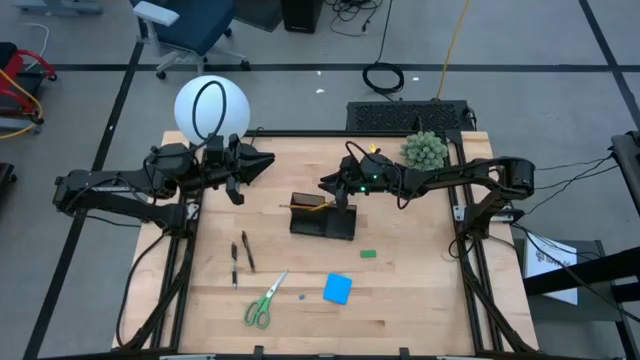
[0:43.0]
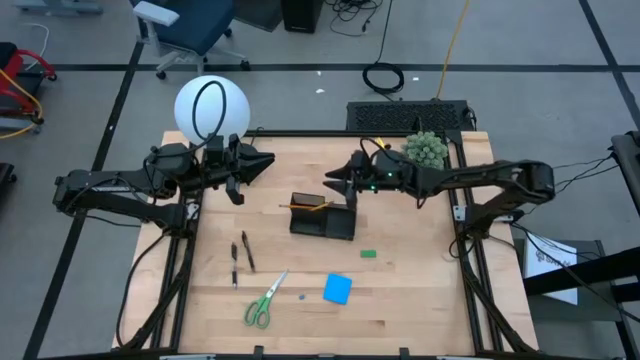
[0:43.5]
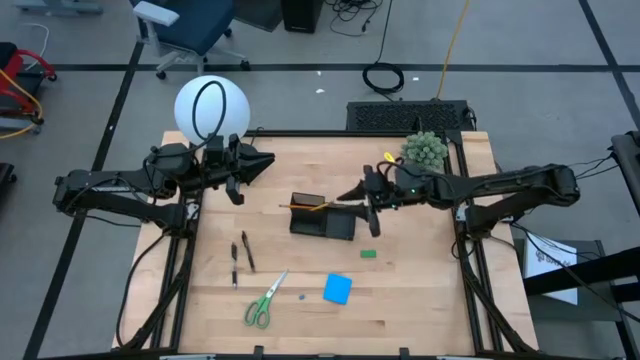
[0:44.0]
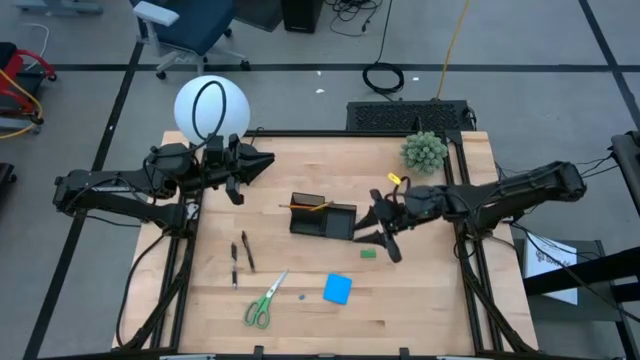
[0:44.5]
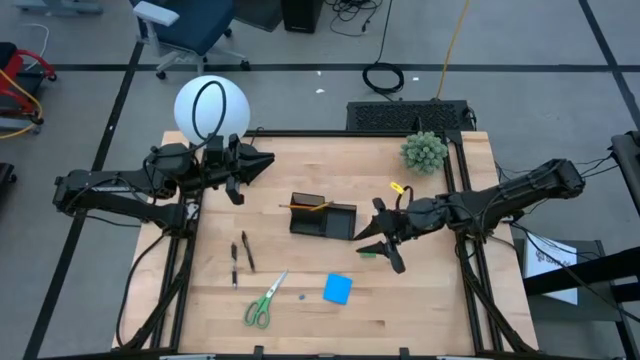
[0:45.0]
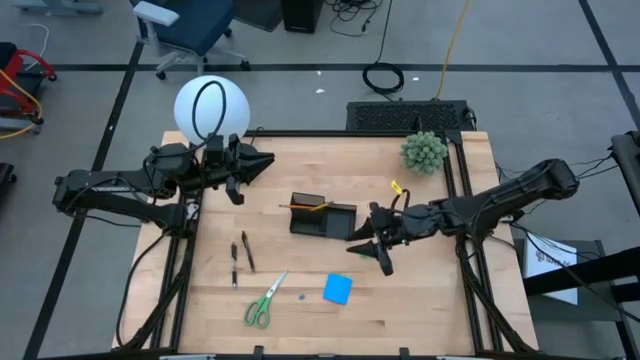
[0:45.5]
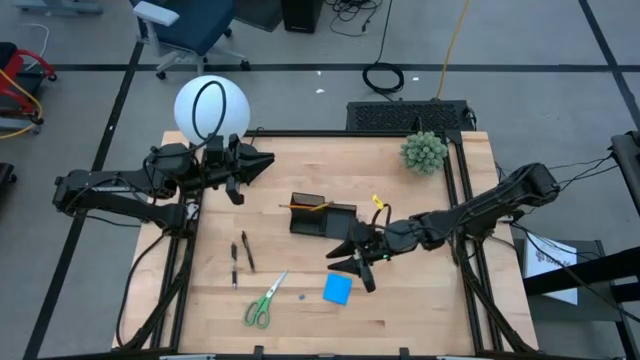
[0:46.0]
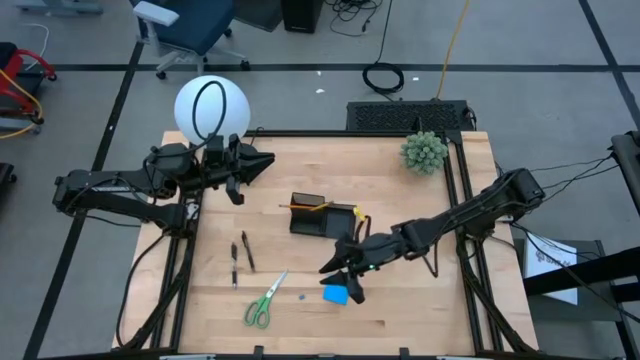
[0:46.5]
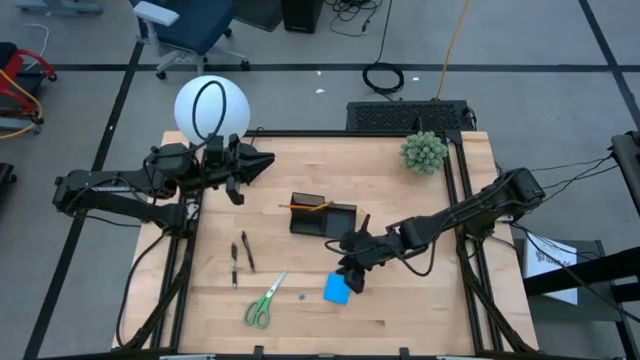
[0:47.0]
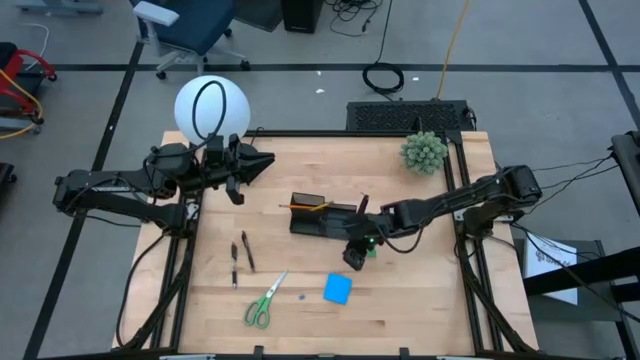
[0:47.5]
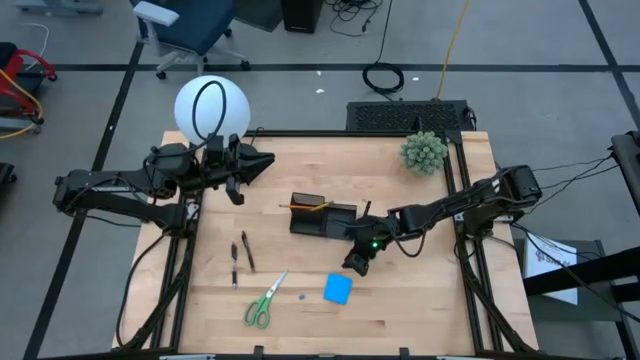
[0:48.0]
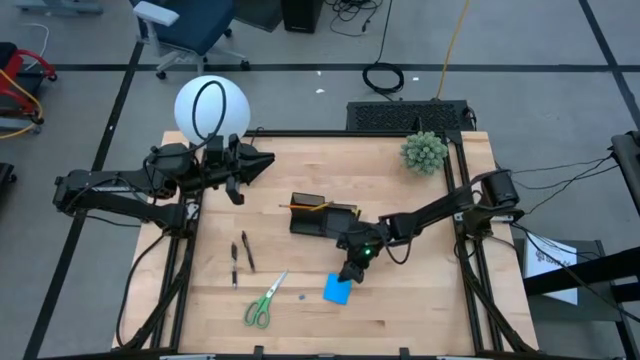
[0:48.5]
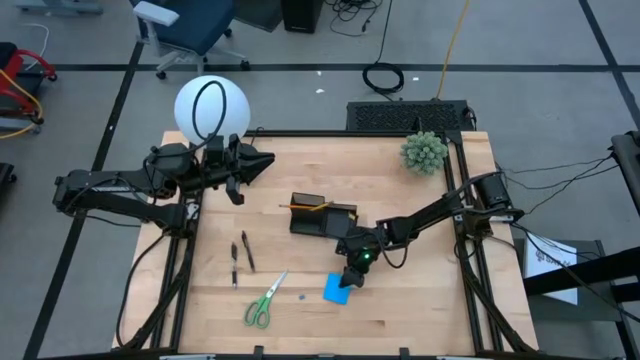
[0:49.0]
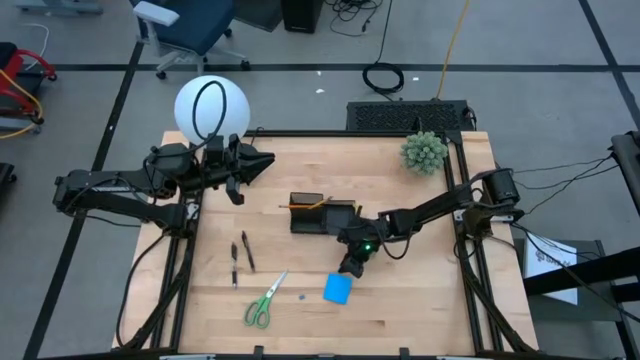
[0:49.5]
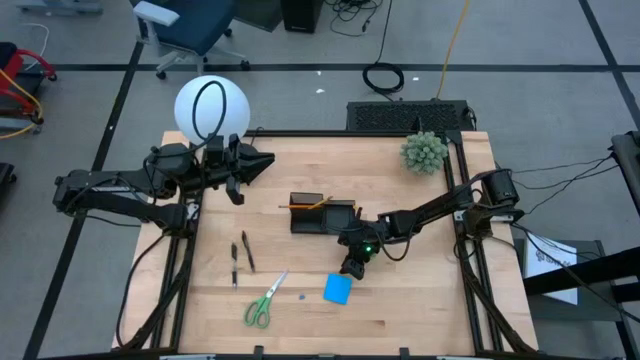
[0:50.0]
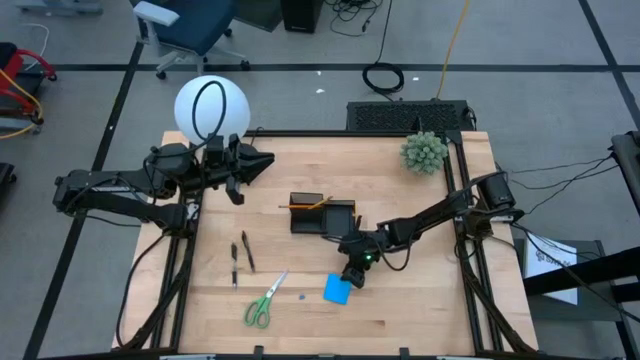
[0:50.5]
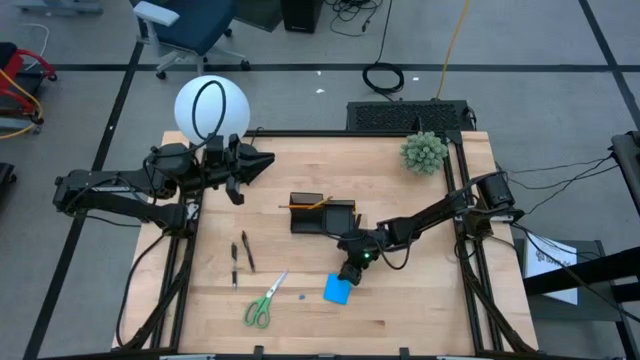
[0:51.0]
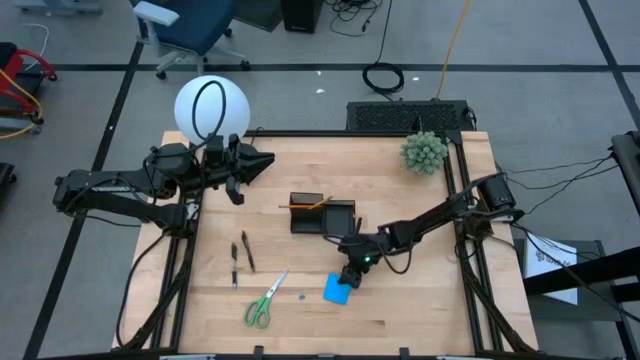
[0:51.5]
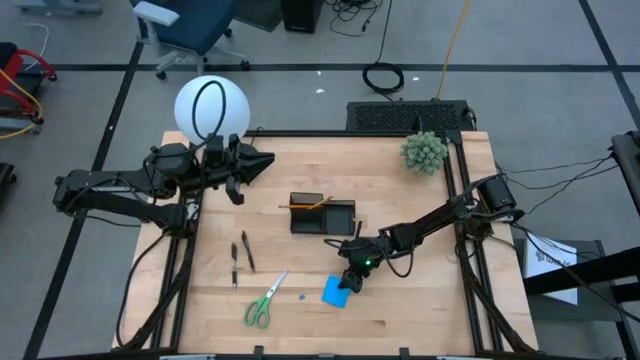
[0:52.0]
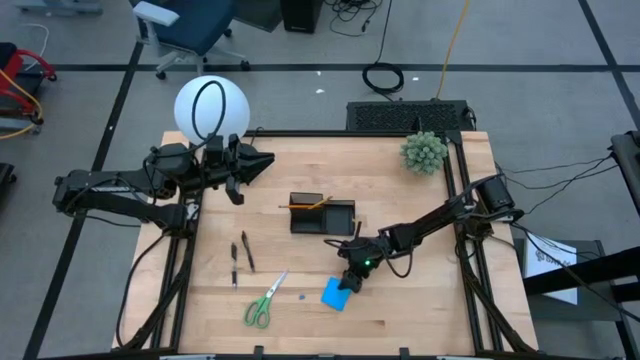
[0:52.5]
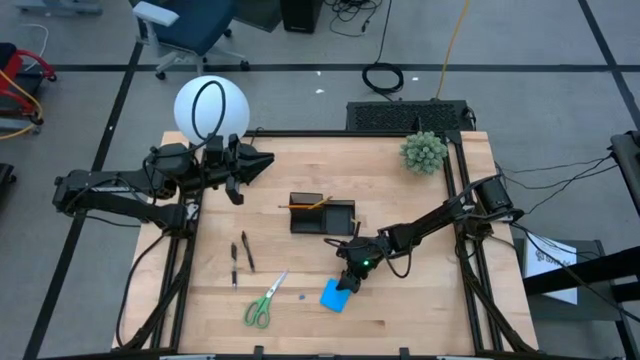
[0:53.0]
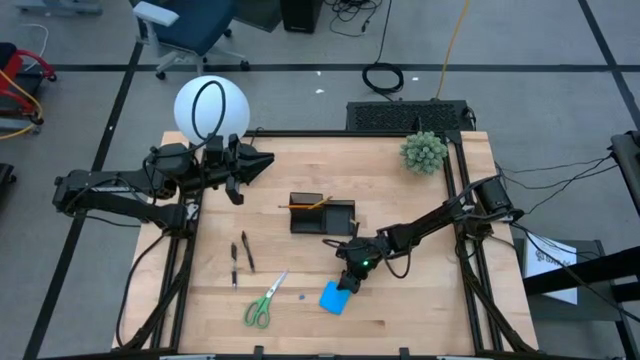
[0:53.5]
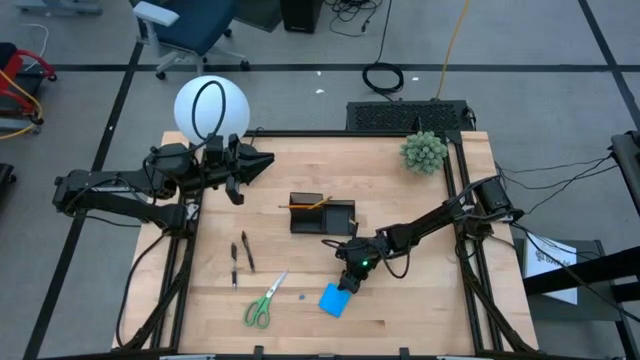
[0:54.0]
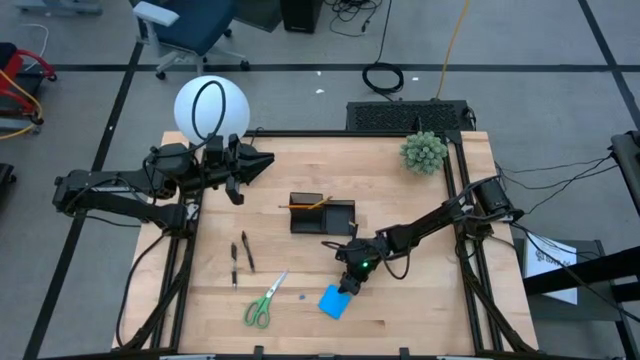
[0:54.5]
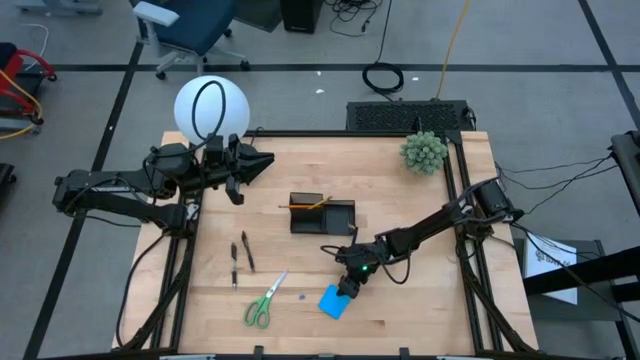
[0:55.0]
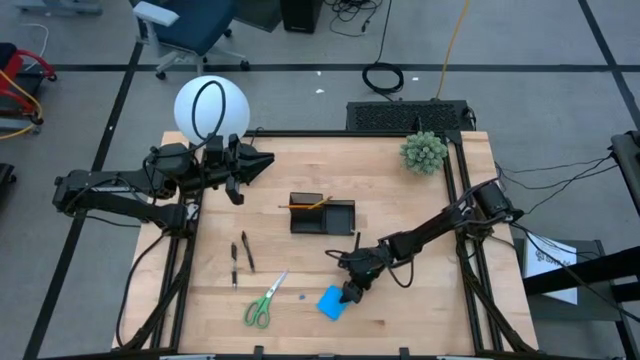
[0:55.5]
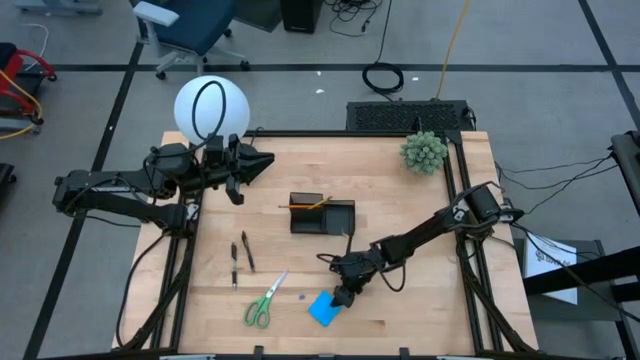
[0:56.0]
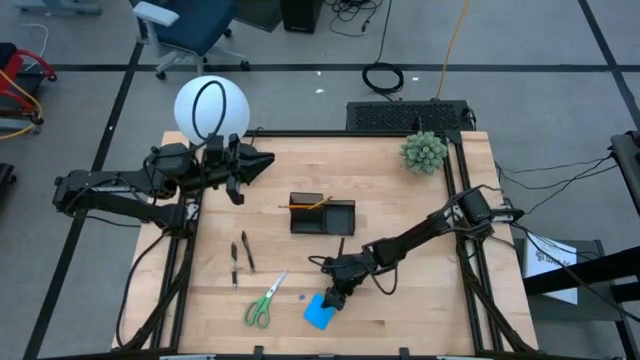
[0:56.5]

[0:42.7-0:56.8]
Task: Pick and place office supplies into organizer
Put the blue sticky notes into the of the desk organizer

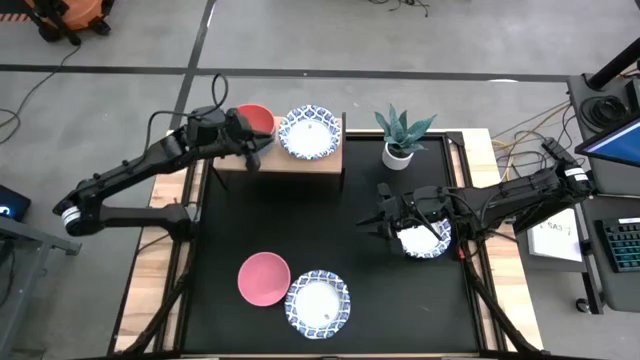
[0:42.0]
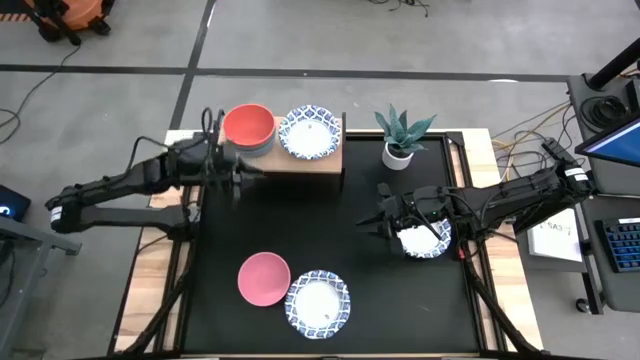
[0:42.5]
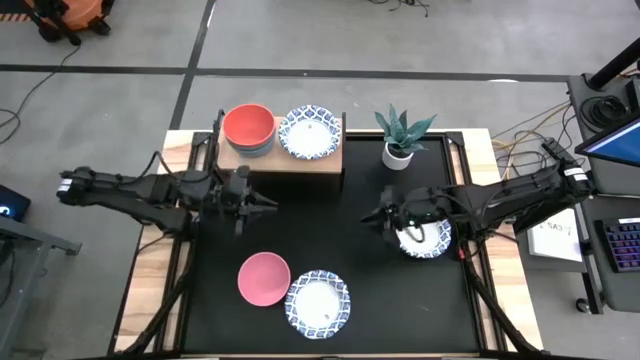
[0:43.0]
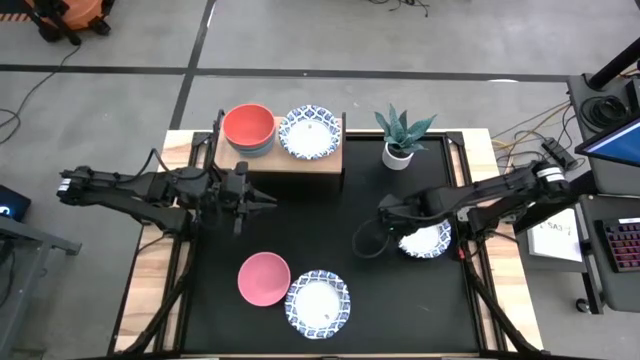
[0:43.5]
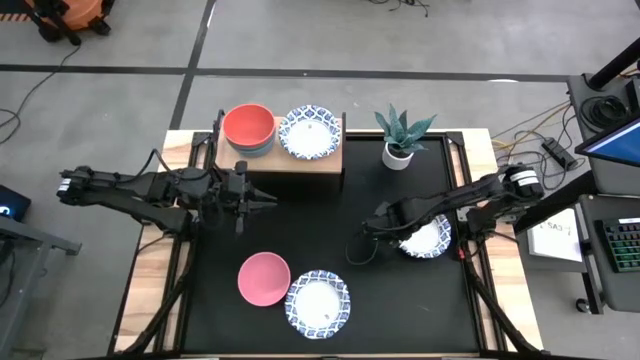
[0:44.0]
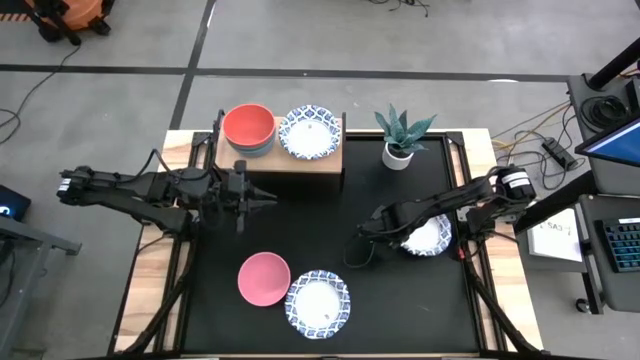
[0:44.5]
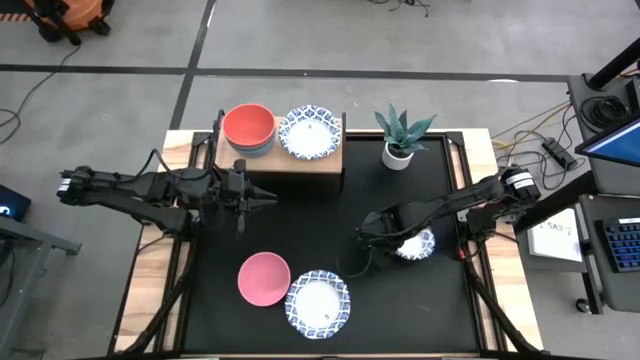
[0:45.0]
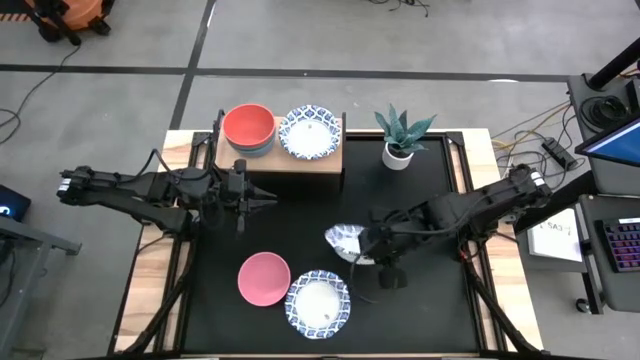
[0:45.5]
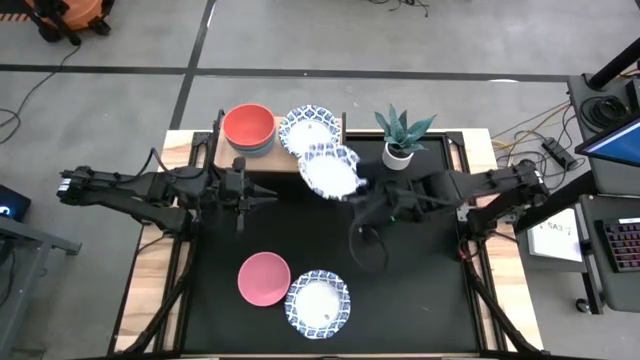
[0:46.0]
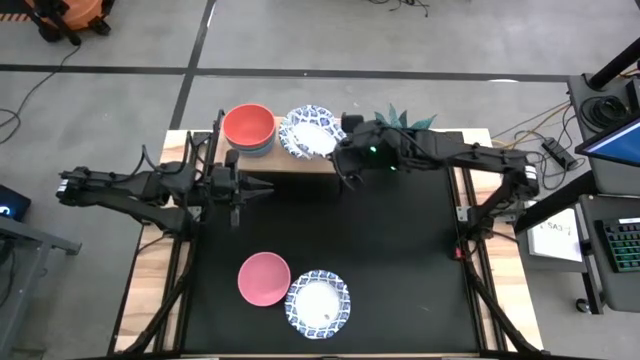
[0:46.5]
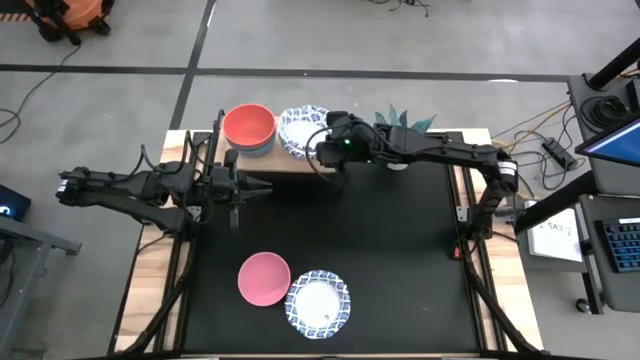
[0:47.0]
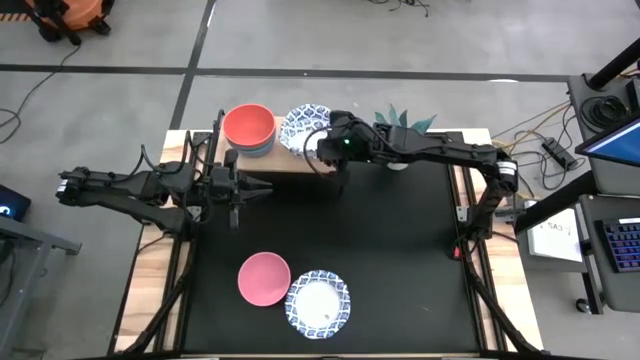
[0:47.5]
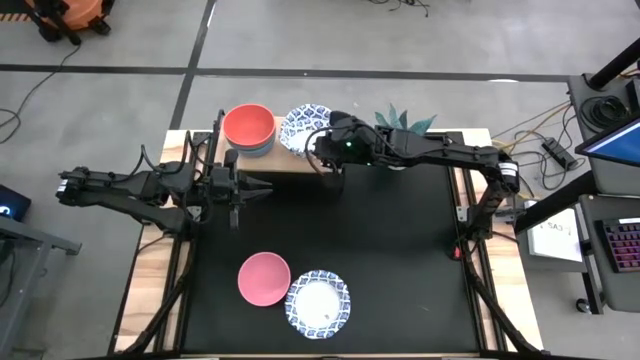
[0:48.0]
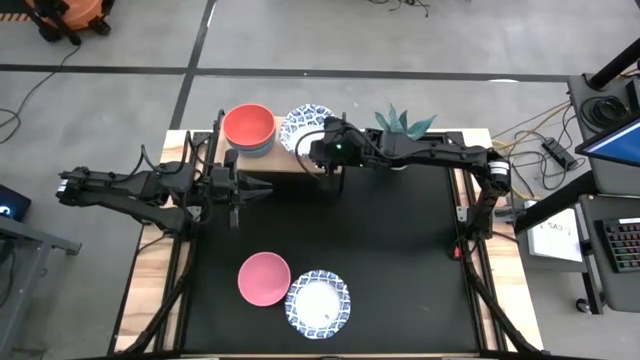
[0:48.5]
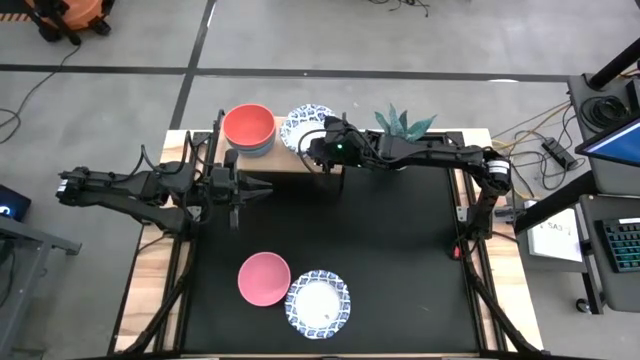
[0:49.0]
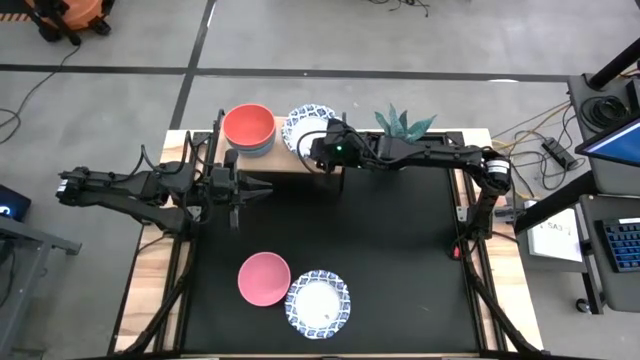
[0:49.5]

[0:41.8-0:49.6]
Task: Place and stack bowls onto a shelf
Stack the right white patterned bowl on top of the other white patterned bowl on the shelf

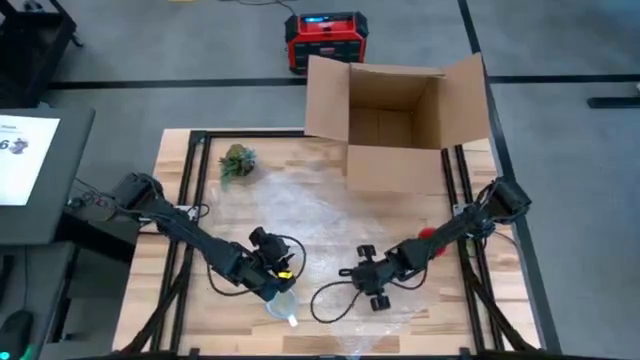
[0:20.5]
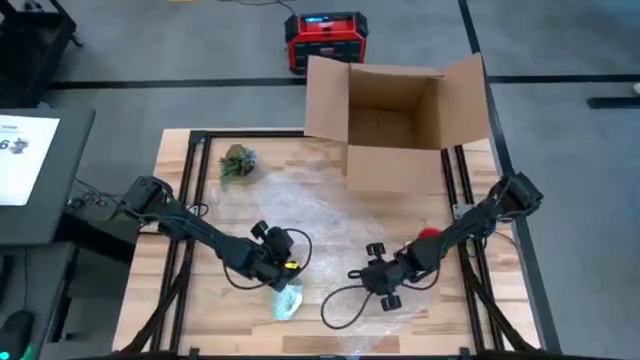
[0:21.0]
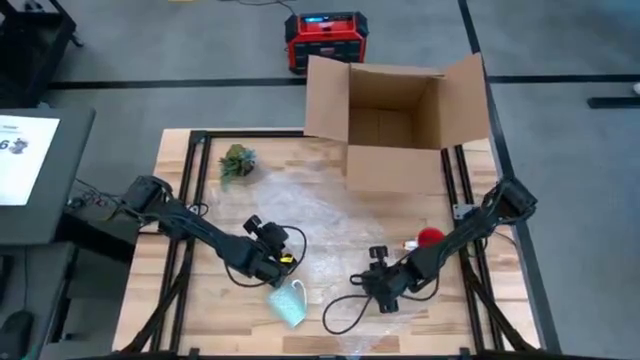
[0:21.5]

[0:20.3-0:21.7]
Task: wrap mug
Wrap the blue patterned mug with the transparent bubble wrap
